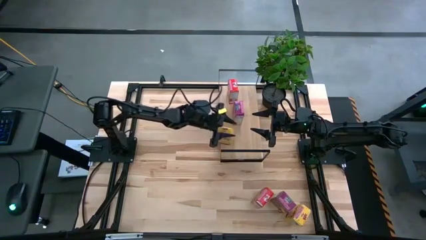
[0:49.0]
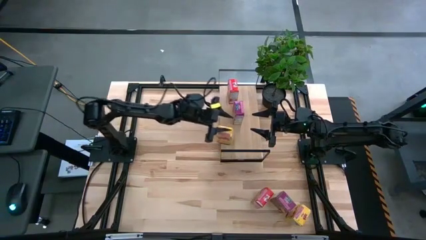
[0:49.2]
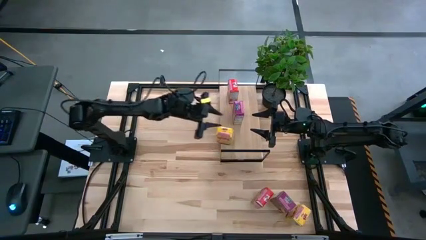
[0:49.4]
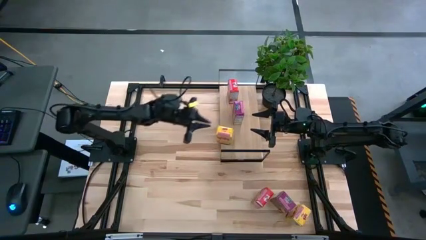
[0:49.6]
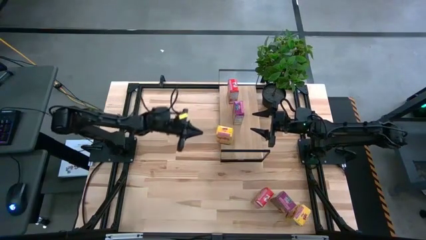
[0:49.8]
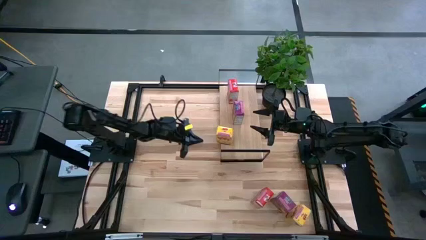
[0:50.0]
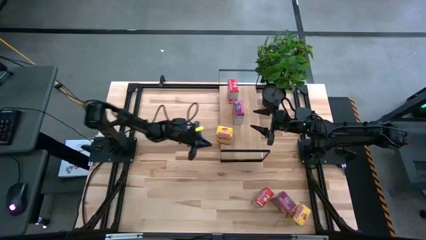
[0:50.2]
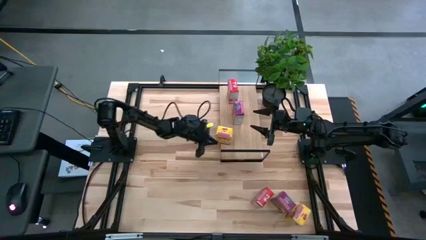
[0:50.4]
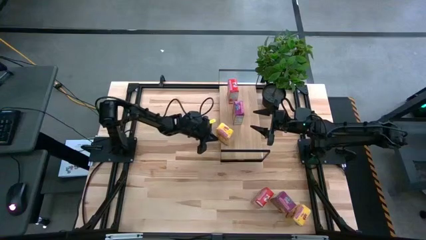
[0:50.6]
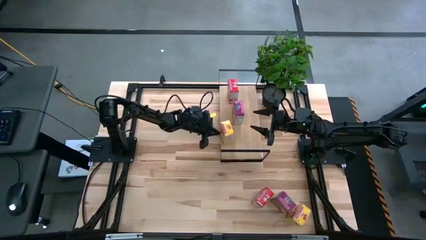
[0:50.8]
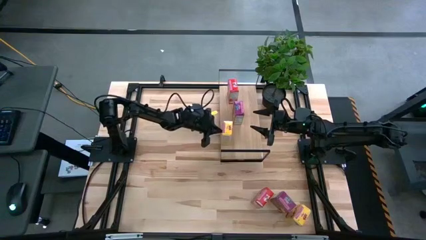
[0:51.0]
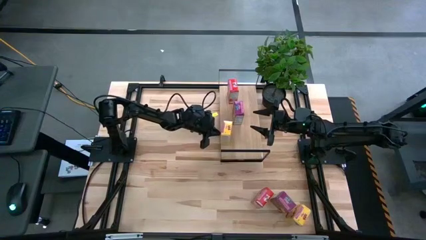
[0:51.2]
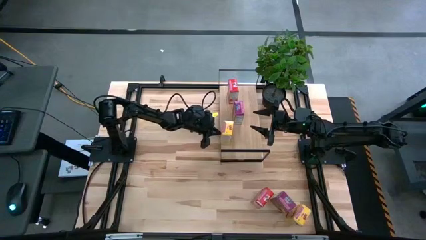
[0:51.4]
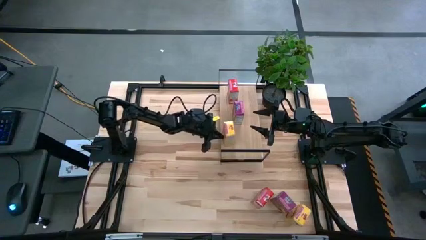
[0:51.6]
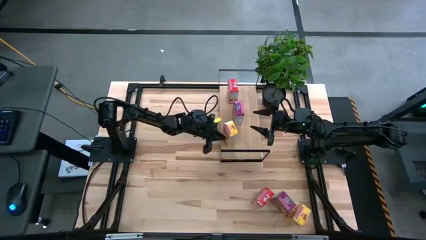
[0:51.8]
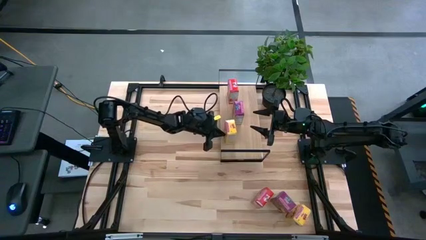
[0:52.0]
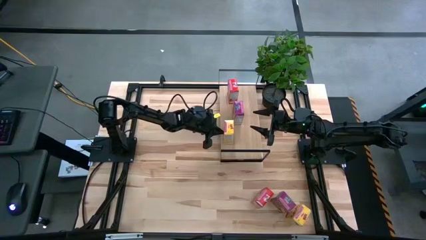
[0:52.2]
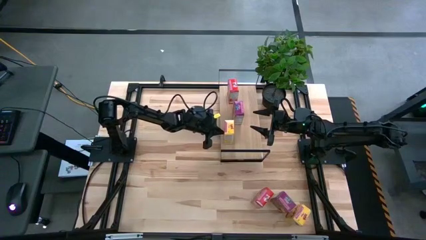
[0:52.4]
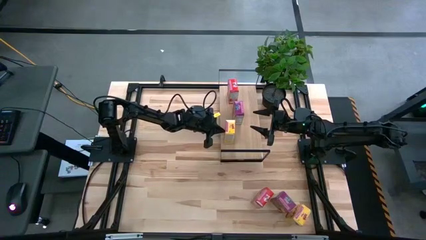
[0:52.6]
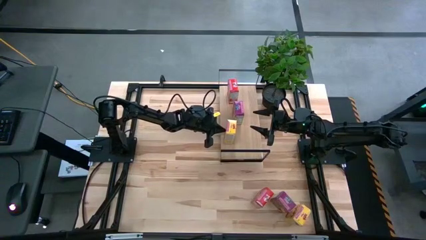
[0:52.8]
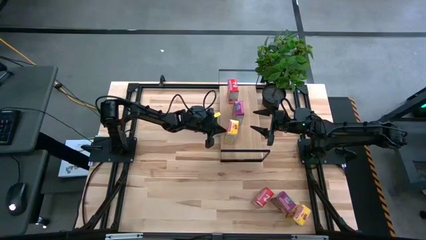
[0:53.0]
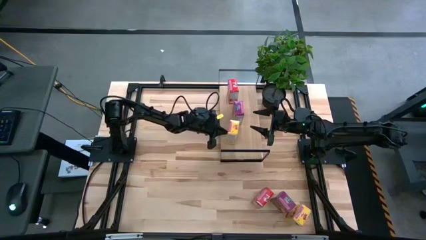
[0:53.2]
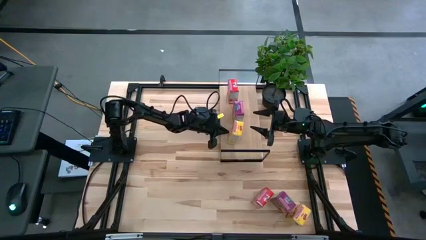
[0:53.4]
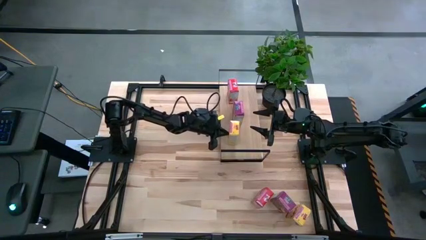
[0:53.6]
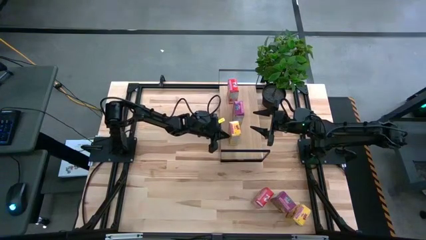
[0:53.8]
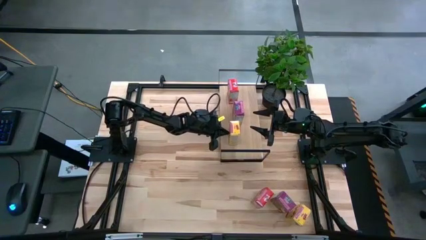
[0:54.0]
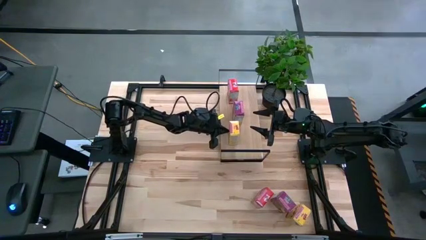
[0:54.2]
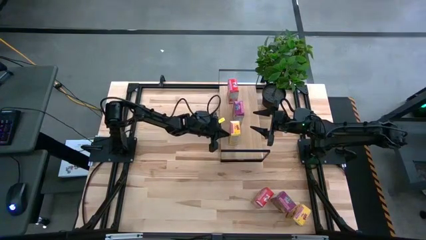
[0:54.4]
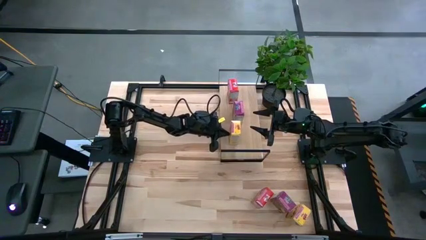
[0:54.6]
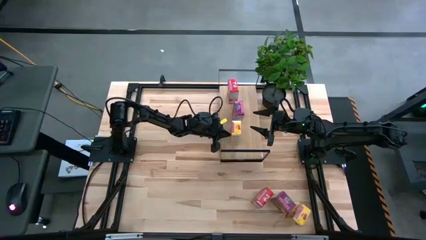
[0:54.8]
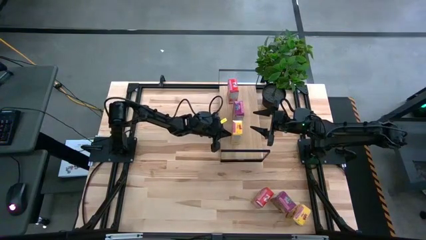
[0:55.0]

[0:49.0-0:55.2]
Task: Stack cereal on shelf
Adjust the yellow cereal box on the shelf

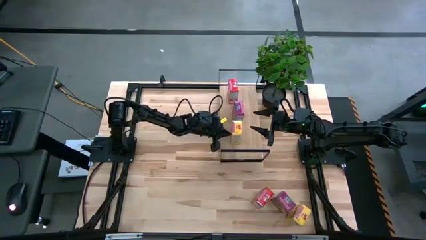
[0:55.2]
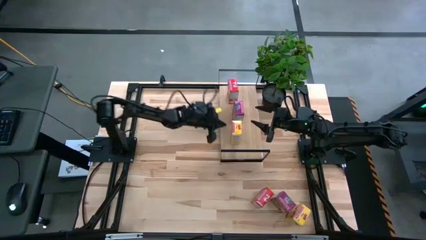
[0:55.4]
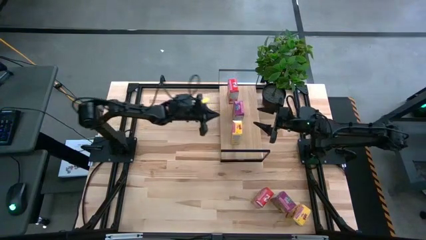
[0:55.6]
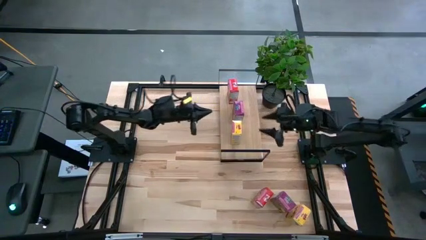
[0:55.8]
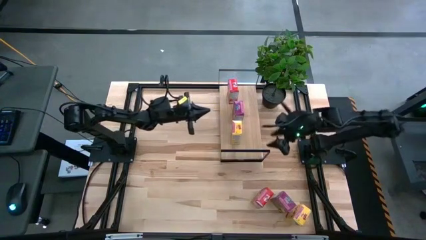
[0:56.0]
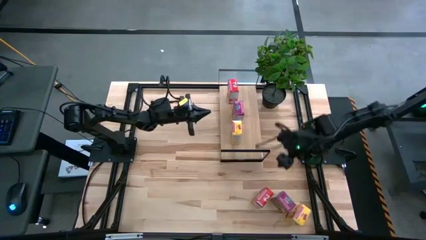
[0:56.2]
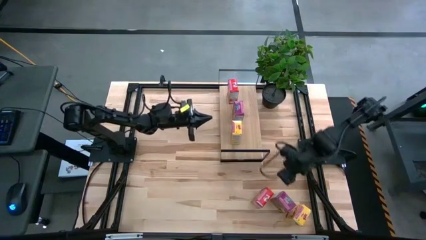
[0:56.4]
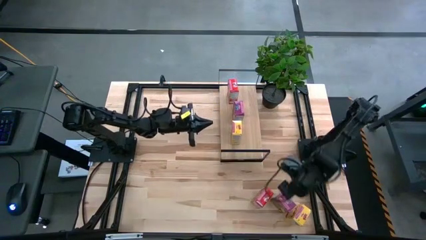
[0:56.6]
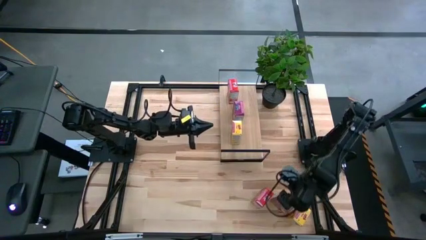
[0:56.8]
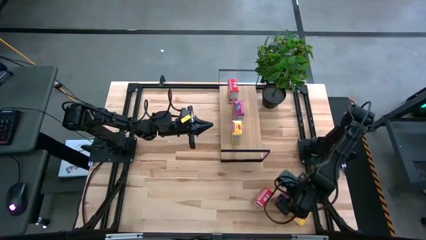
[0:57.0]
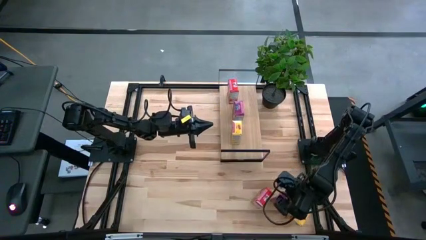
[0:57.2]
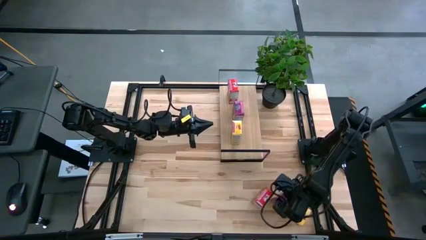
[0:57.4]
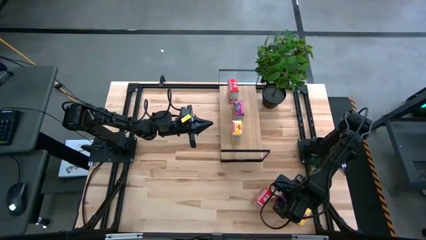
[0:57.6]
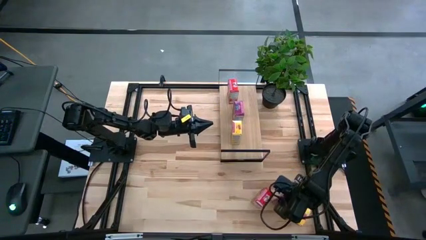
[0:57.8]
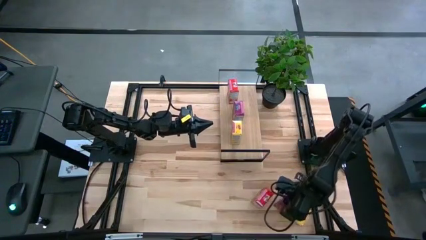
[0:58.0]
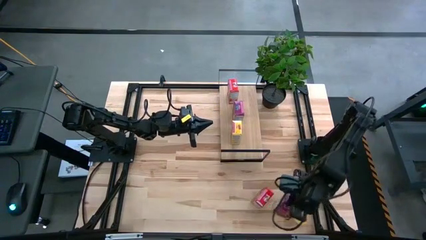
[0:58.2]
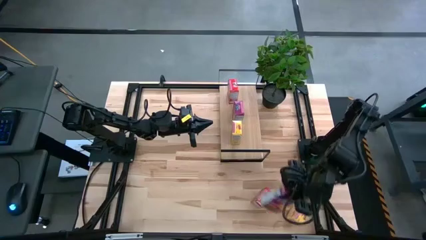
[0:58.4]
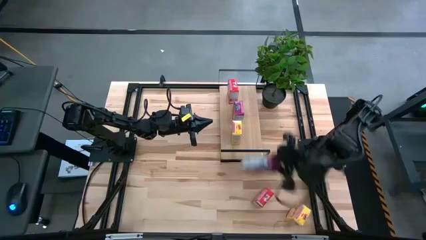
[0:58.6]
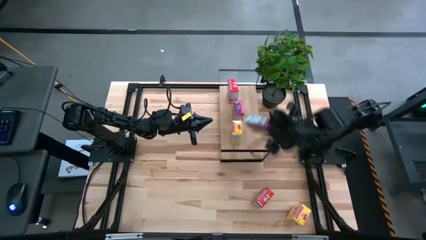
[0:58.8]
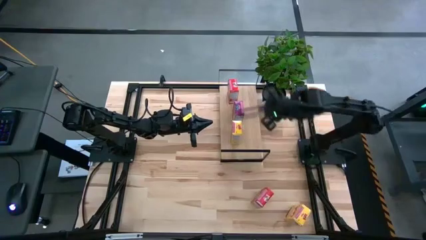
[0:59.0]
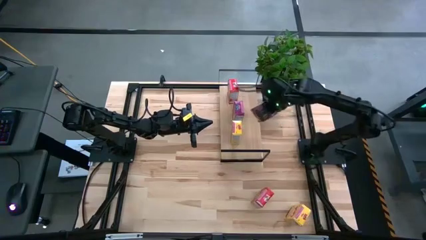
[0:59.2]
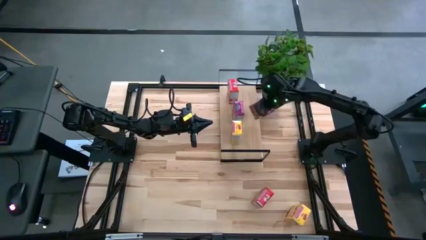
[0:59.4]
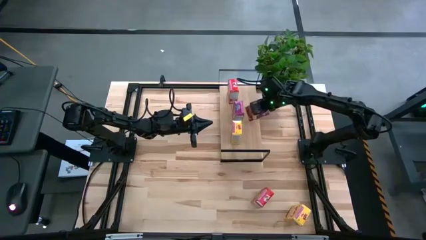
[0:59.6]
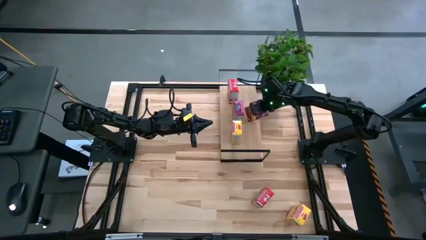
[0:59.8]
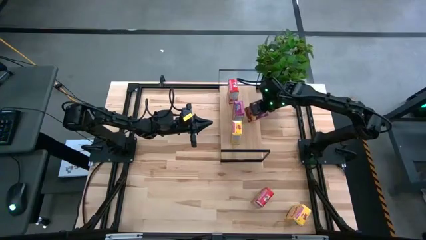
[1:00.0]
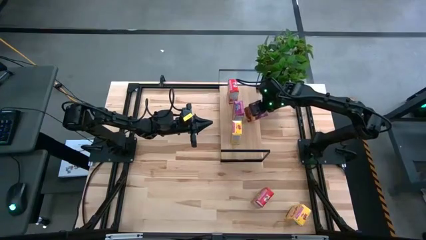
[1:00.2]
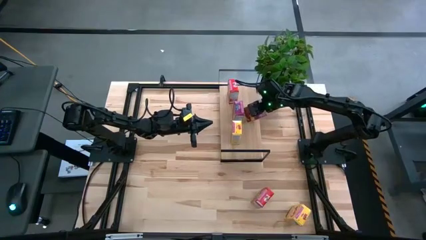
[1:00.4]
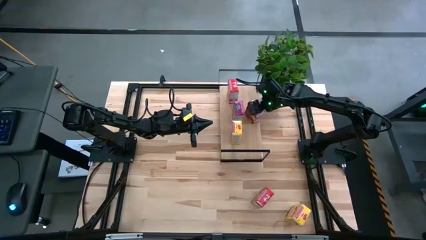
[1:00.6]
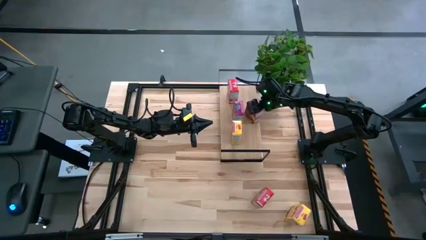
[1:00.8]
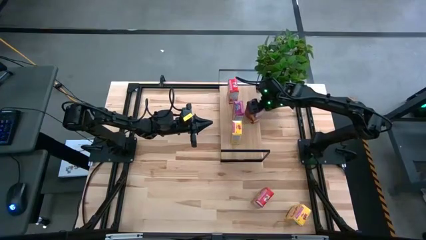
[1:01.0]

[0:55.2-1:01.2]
Put the purple cereal box on the shelf

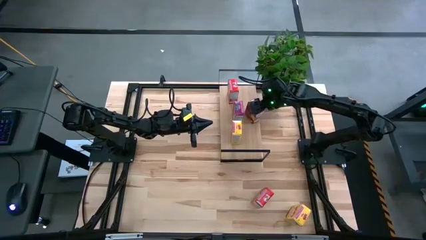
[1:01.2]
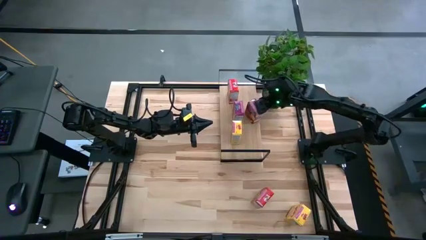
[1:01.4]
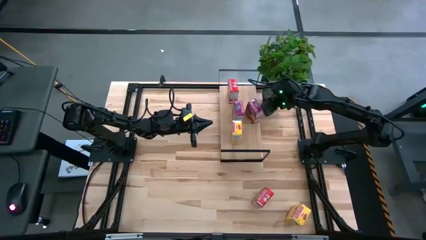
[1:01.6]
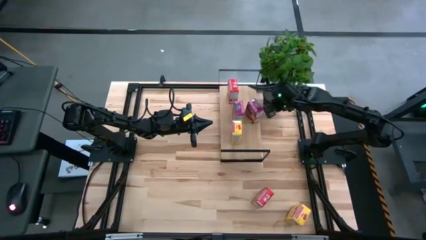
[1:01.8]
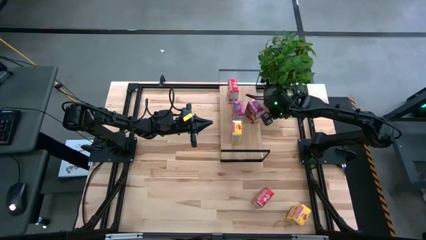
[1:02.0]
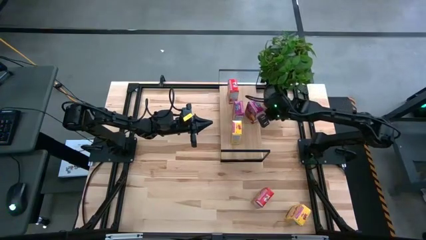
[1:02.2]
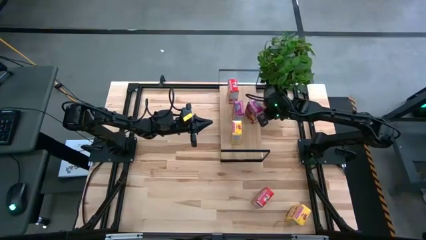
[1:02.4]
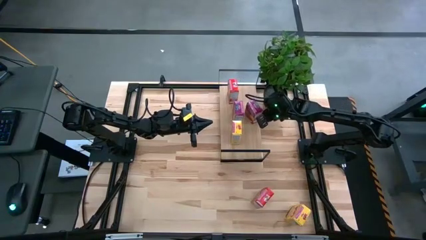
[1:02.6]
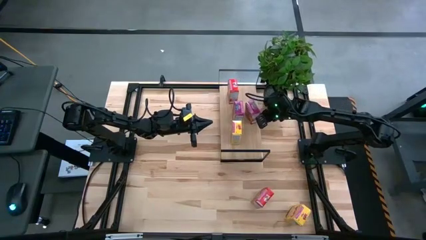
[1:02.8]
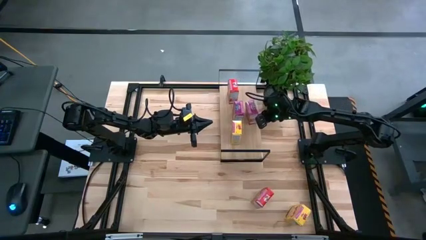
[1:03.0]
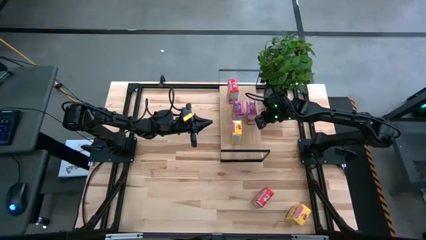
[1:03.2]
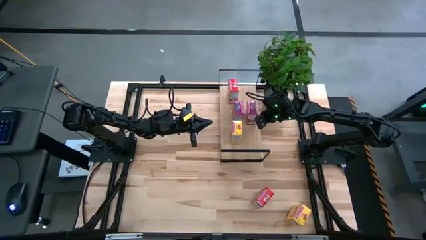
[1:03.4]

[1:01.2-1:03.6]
Adjust the right purple cereal box on the shelf
